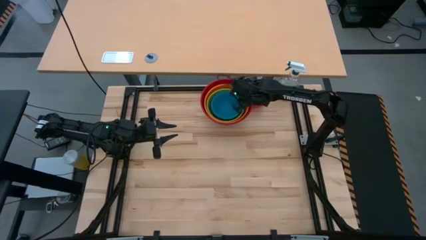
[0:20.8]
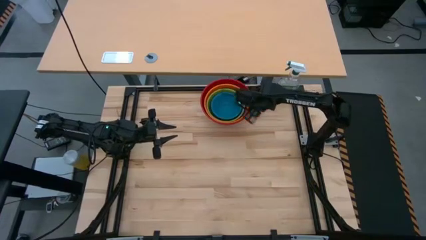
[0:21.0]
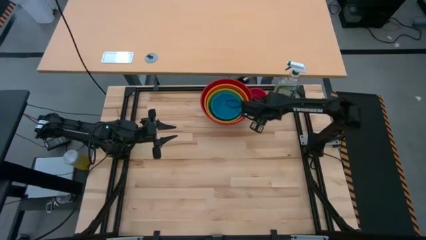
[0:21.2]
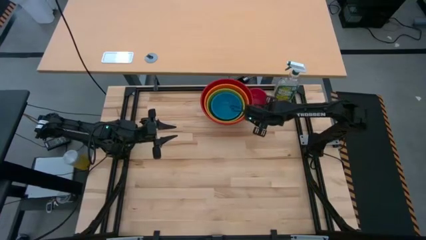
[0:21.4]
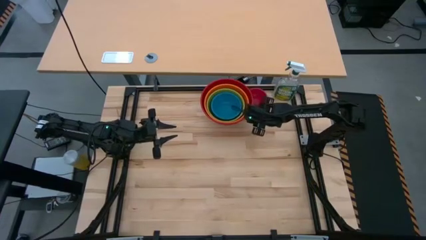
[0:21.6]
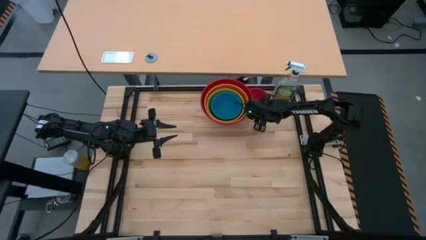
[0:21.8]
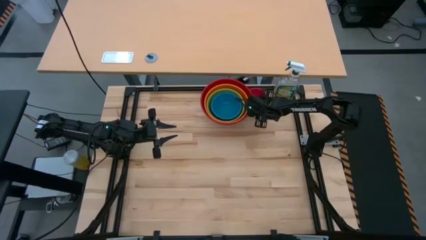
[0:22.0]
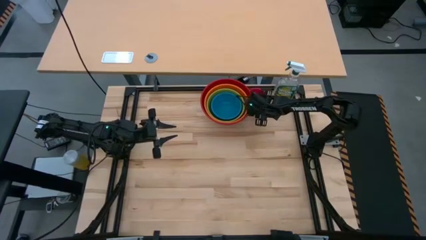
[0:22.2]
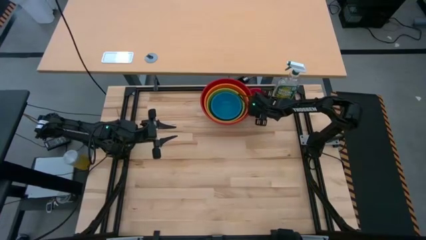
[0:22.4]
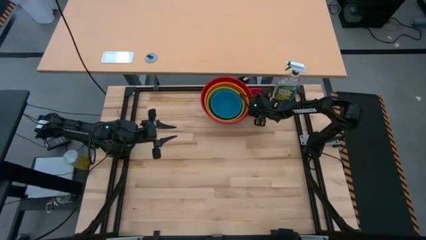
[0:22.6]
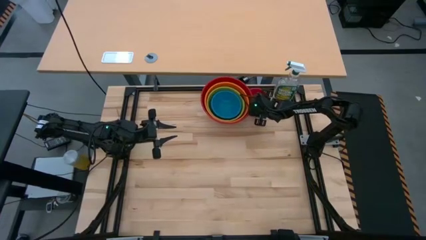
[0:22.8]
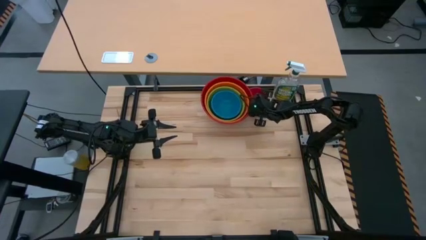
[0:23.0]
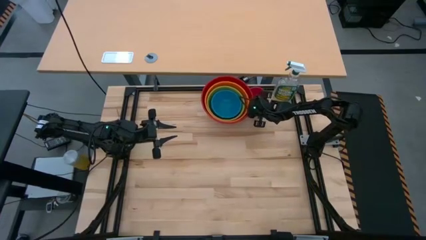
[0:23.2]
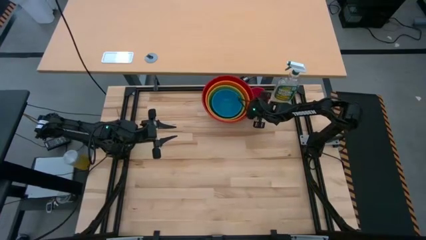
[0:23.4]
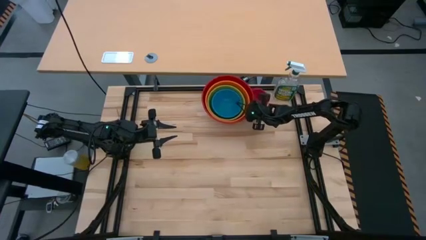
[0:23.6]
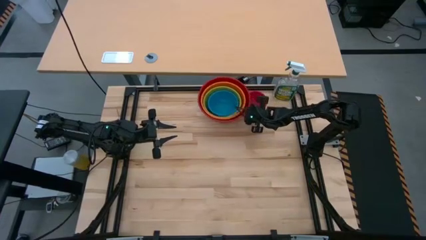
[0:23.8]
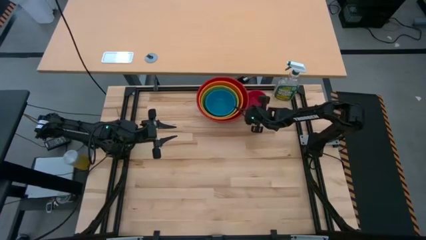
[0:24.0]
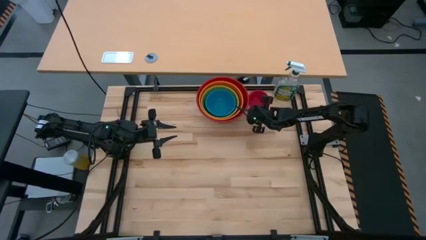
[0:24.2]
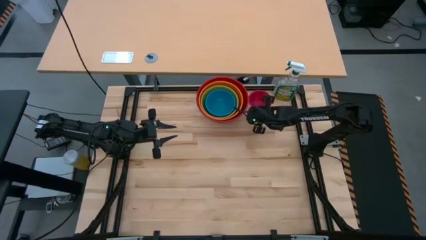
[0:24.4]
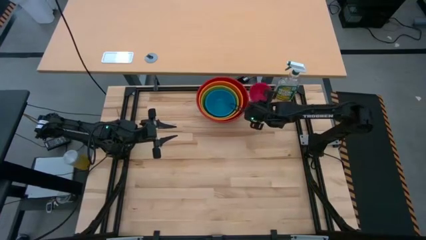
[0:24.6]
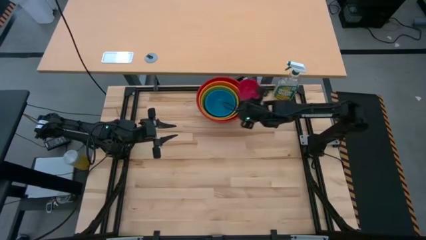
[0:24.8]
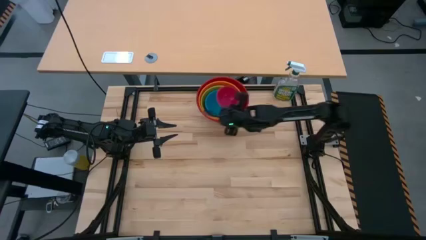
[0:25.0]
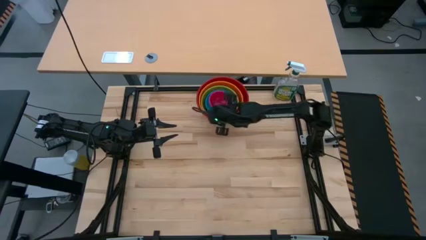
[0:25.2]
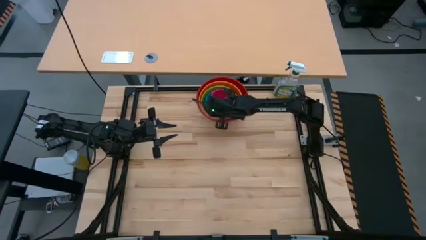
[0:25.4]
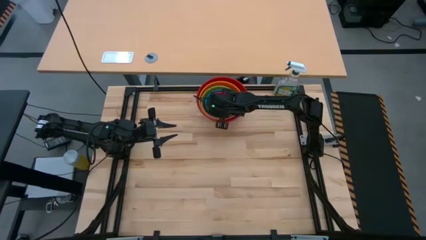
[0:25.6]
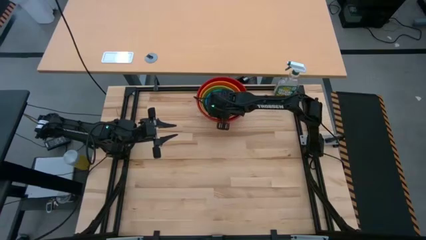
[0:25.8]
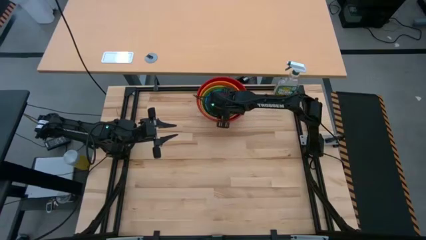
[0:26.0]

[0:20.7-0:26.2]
Stack the small red bowl on top of the small blue bowl

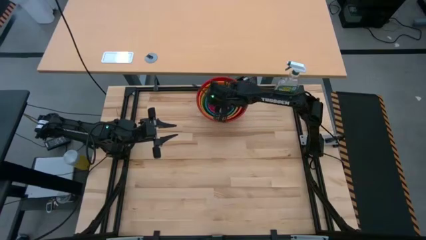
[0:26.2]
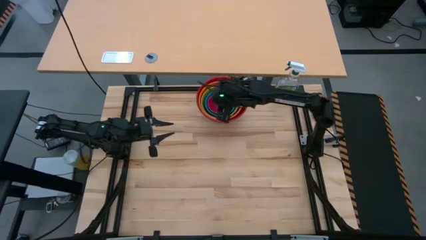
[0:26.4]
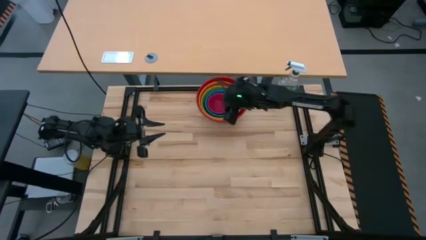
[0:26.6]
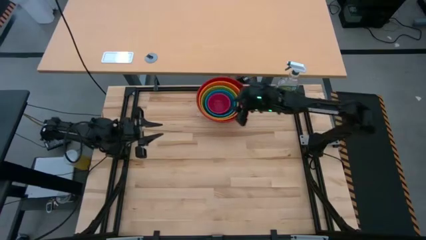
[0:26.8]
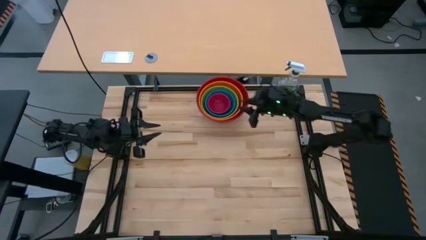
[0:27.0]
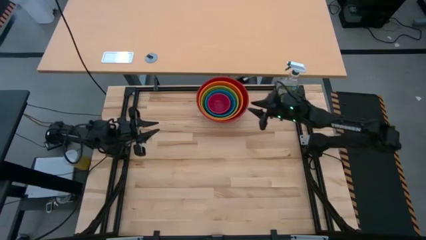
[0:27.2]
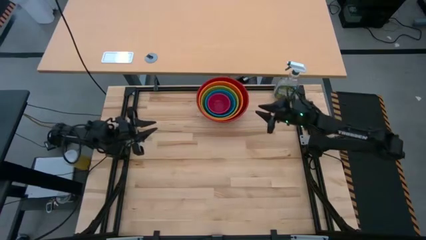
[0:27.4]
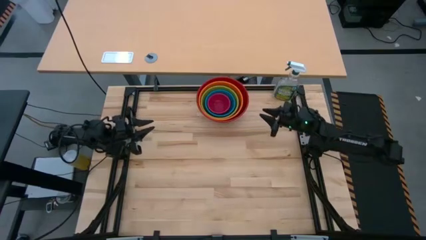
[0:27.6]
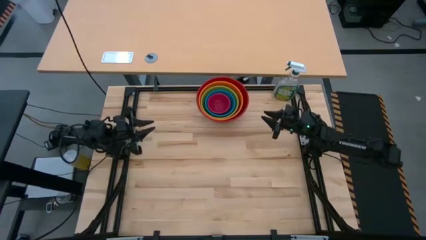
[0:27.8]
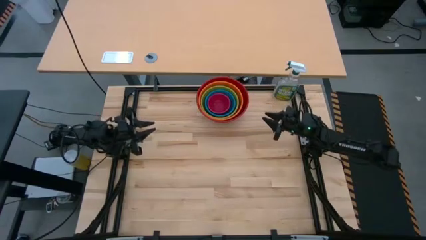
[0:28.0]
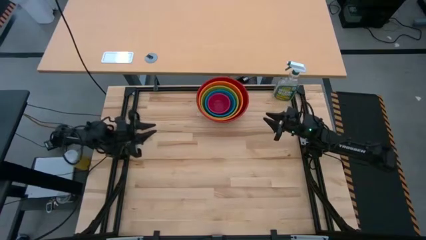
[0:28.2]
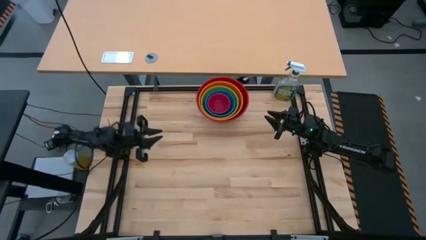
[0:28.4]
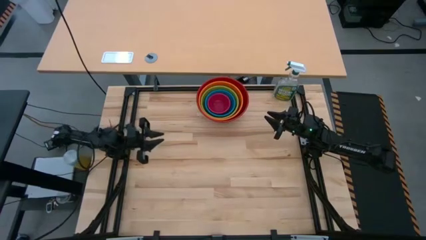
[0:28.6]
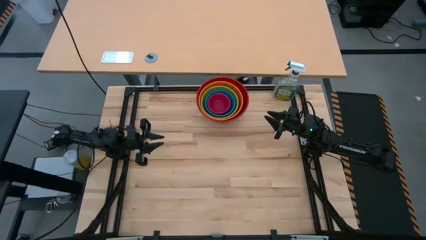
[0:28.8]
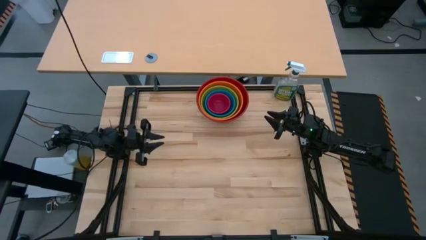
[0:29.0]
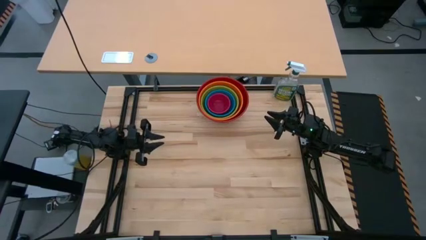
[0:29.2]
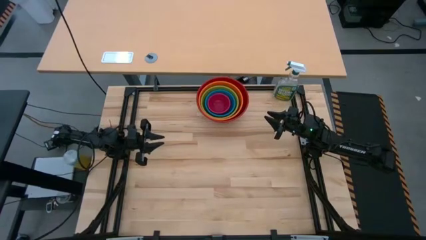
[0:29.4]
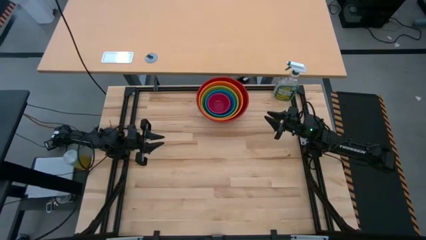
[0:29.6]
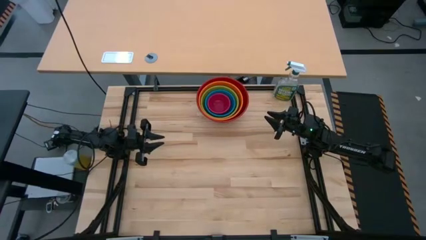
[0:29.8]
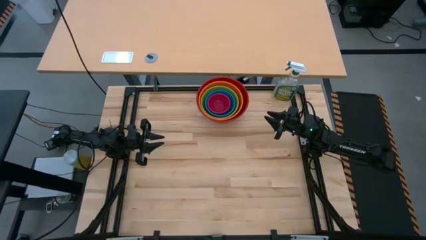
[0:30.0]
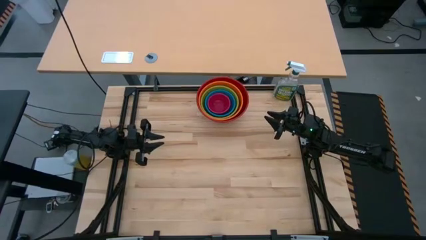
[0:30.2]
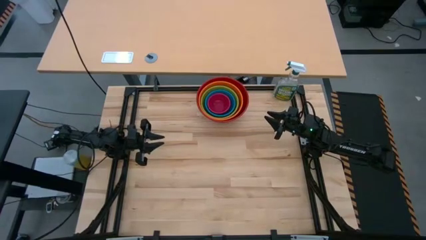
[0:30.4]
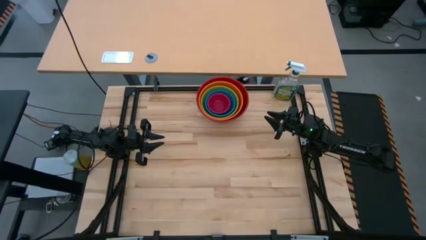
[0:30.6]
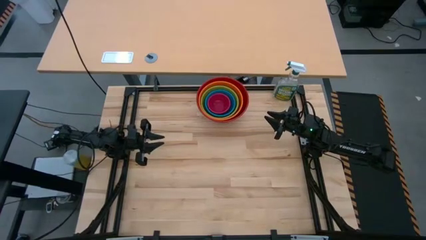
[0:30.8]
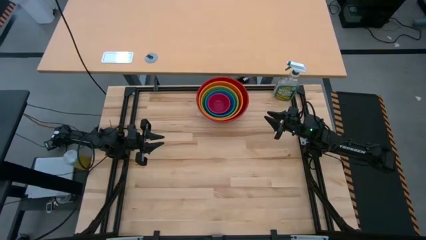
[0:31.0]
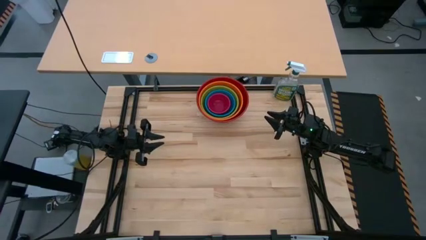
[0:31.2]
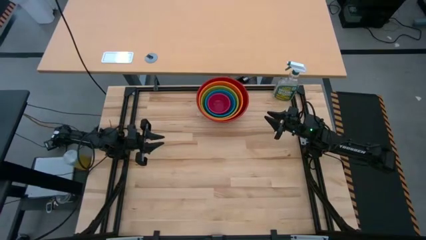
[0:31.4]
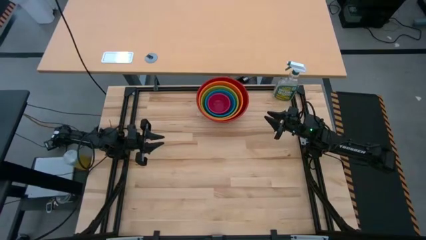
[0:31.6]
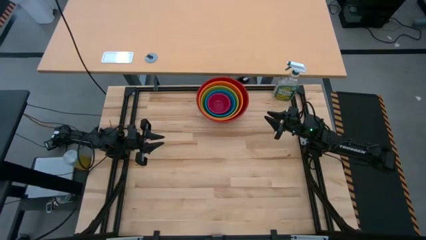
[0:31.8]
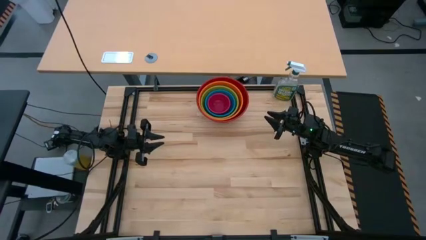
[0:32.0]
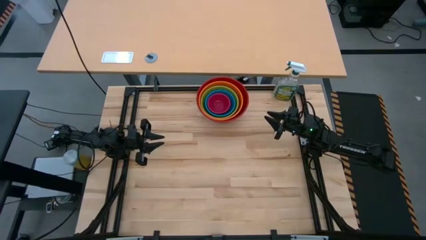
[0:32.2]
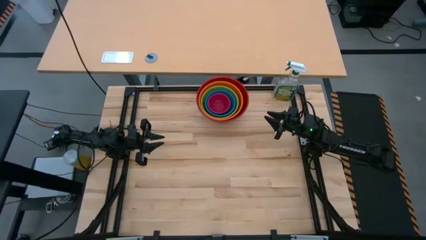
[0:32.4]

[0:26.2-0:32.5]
Return to Home Position
